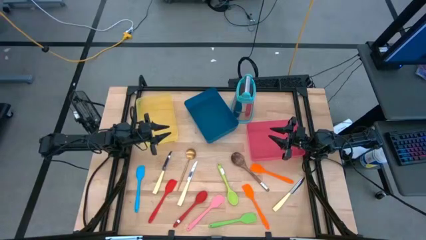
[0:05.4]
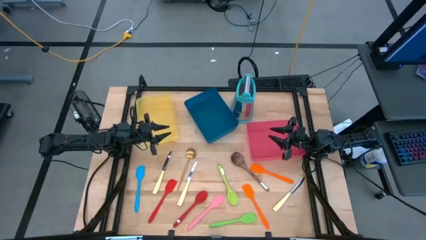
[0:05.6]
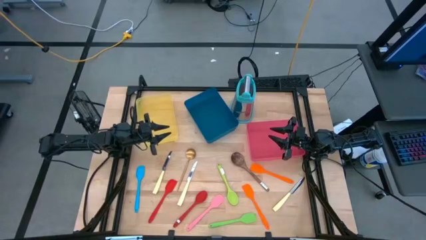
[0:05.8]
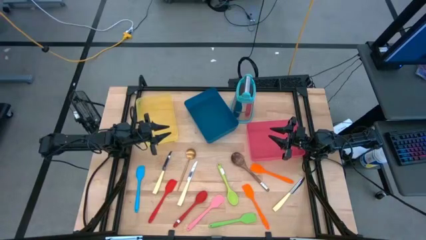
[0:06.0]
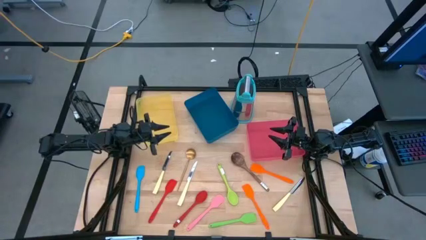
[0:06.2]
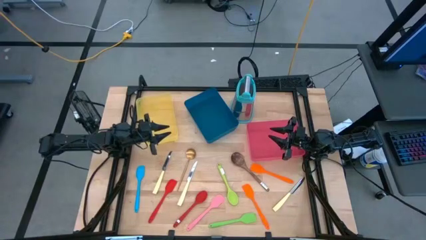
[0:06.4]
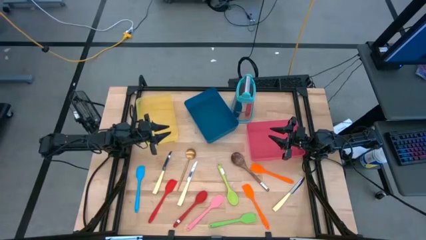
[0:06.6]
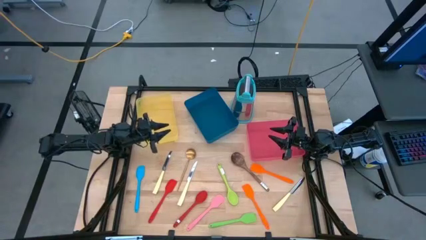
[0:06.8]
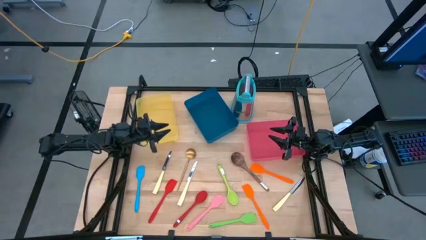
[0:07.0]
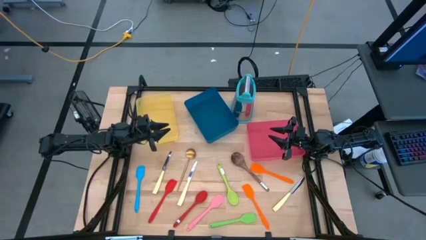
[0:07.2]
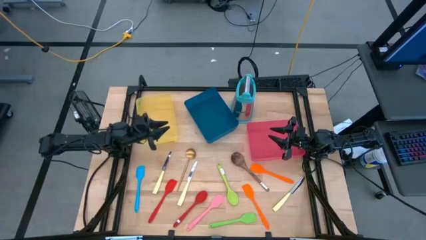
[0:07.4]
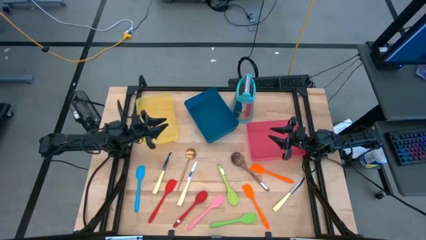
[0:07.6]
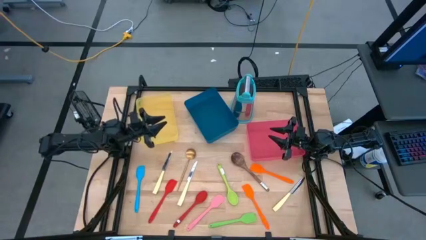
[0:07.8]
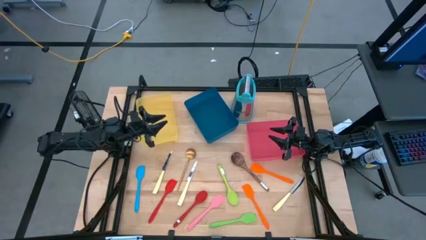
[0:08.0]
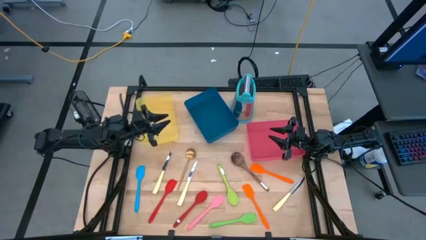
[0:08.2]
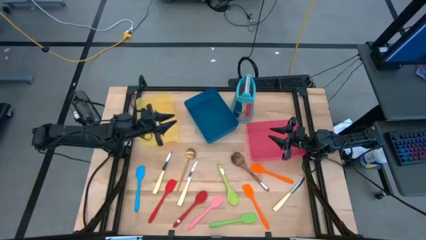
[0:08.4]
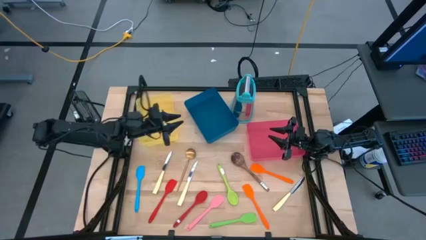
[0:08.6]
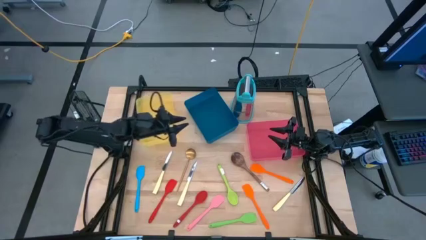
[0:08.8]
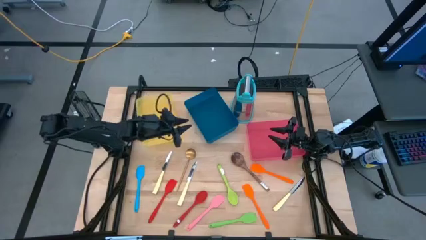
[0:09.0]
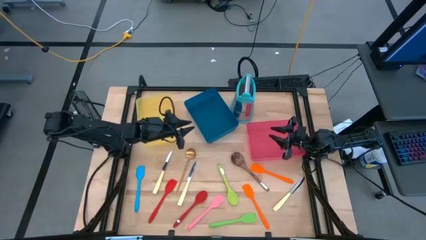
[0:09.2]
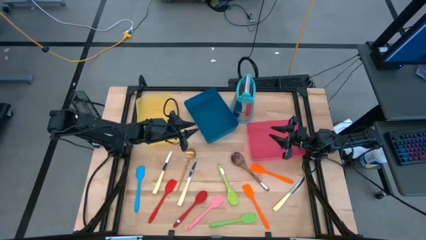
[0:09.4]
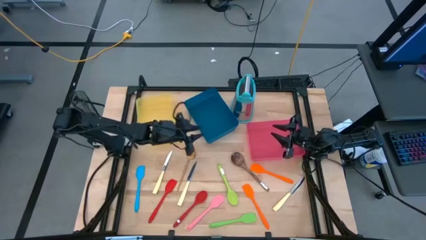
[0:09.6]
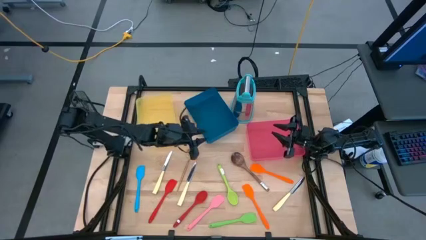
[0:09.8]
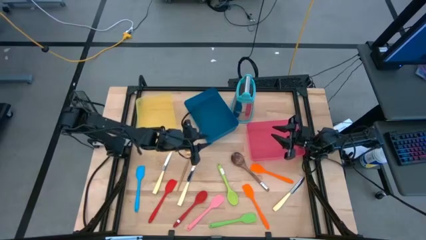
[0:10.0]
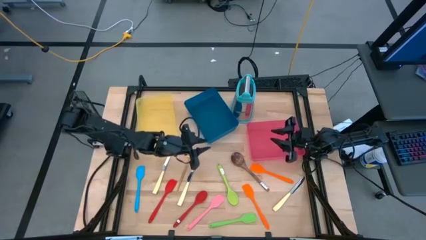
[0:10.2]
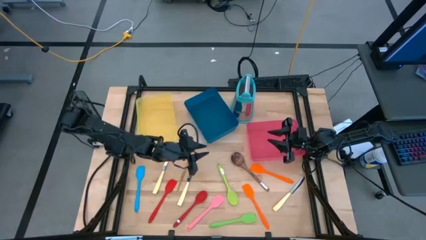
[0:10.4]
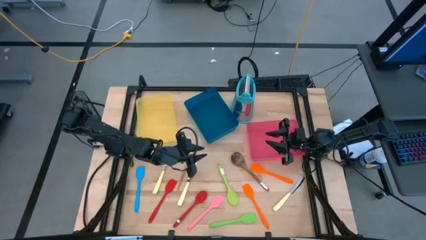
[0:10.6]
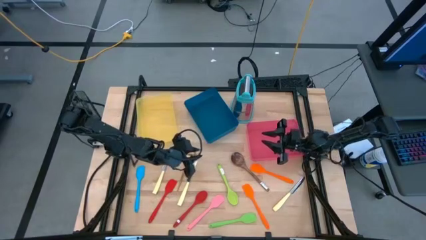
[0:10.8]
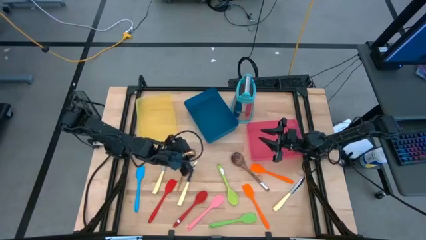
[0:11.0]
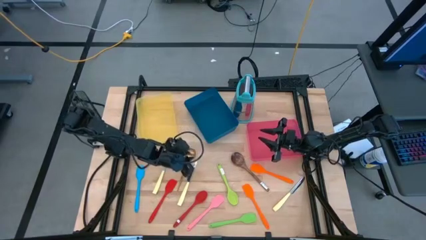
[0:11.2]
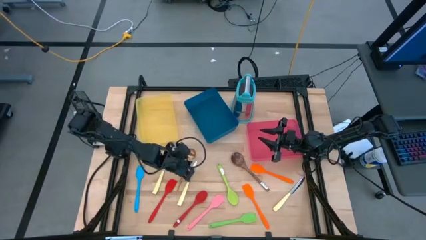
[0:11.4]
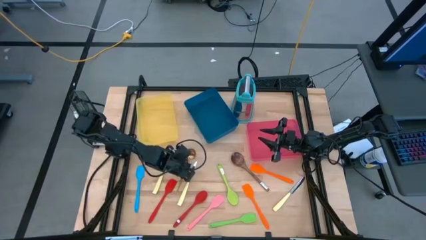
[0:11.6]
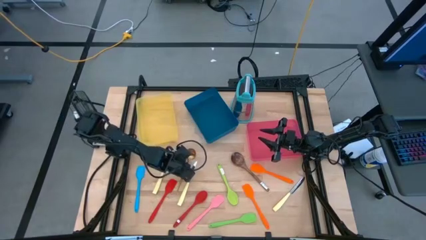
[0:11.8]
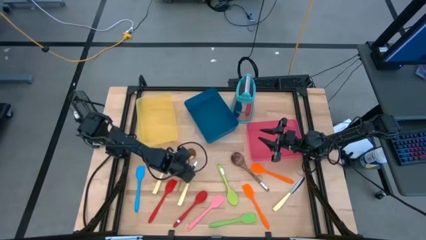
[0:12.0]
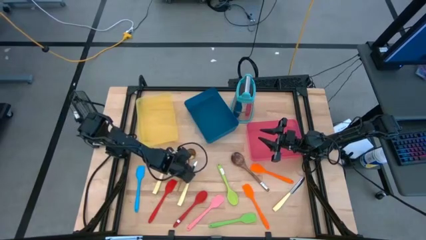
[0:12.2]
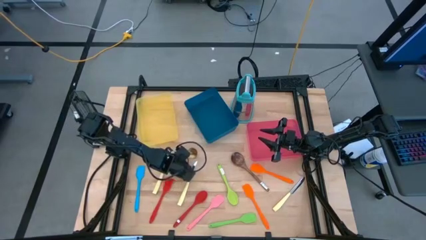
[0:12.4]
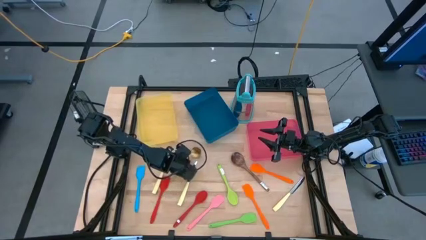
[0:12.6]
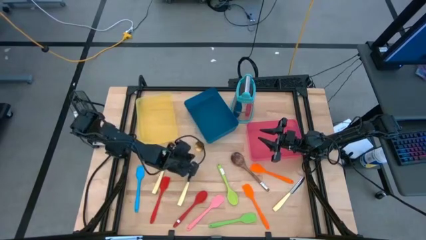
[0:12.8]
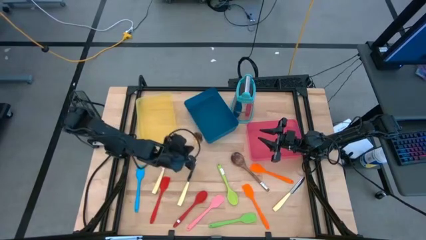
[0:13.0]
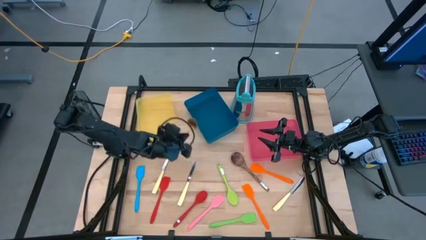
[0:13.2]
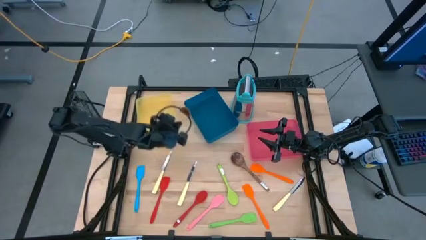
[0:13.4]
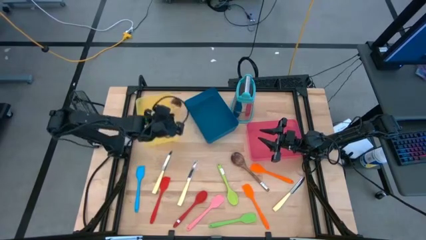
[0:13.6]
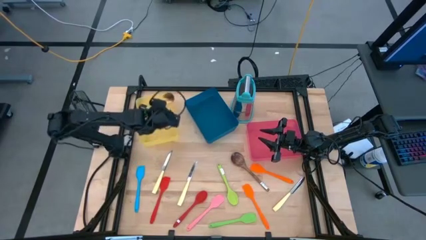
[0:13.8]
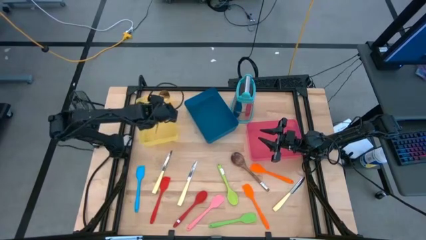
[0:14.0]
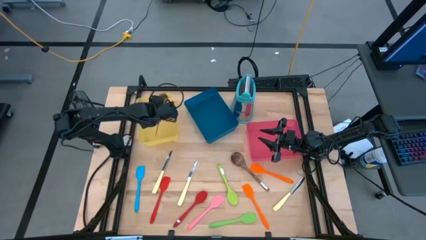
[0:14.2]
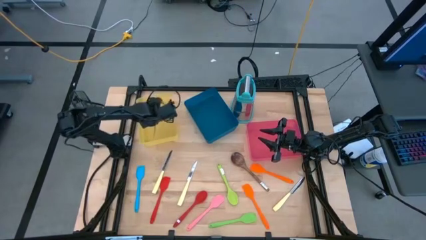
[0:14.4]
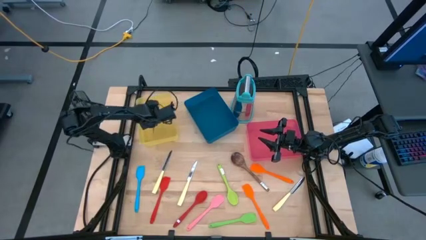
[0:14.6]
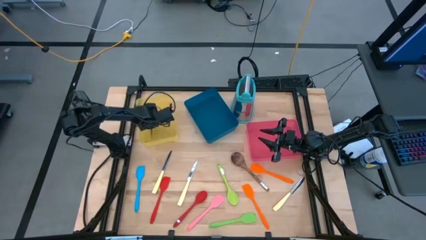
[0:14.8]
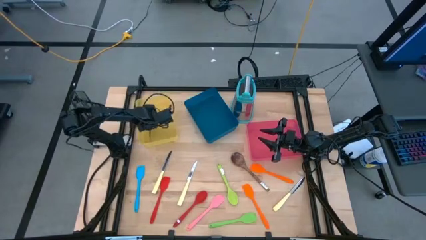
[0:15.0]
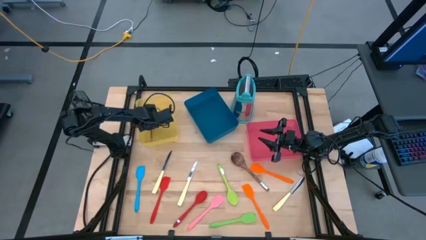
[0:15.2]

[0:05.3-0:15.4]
Task: Pick & Place Kitchen Items
Put the gold serving spoon into the yellow bin

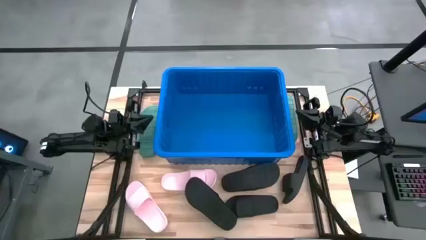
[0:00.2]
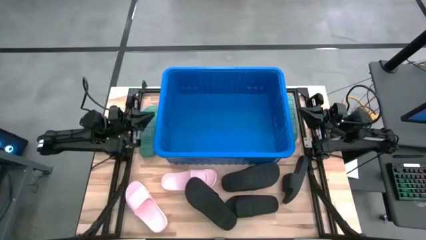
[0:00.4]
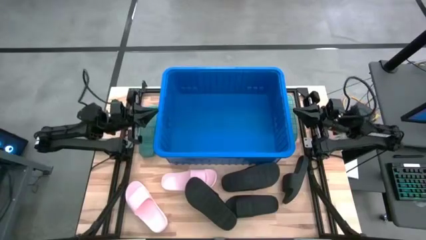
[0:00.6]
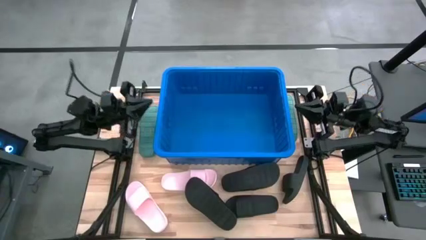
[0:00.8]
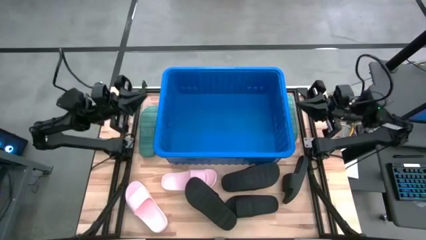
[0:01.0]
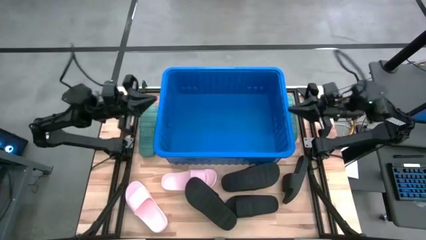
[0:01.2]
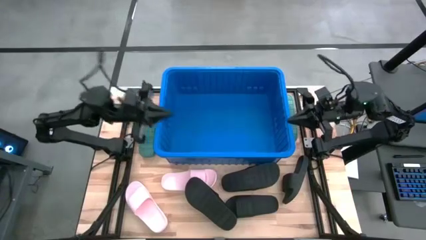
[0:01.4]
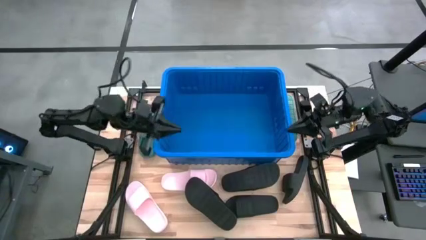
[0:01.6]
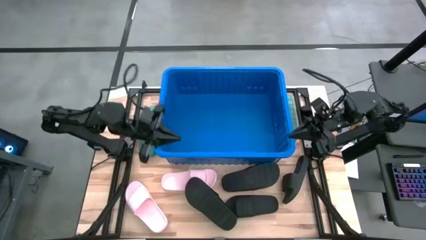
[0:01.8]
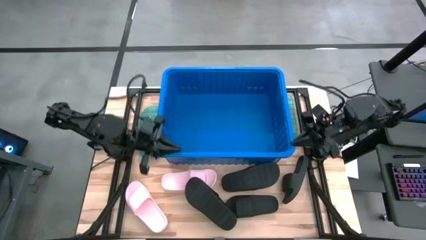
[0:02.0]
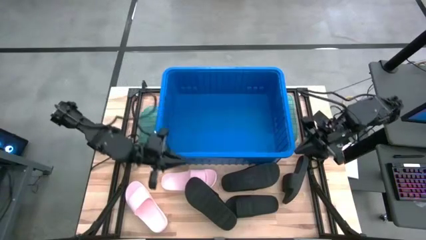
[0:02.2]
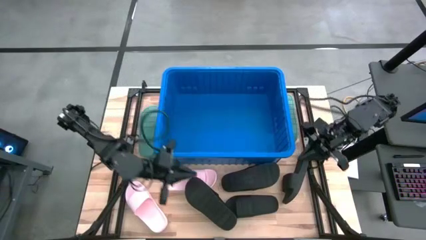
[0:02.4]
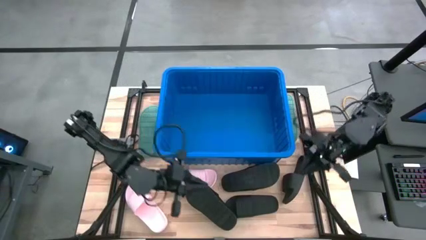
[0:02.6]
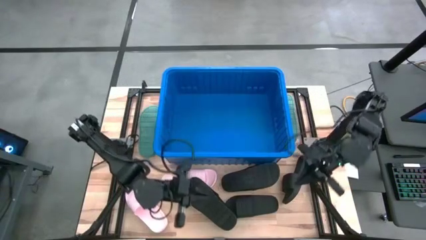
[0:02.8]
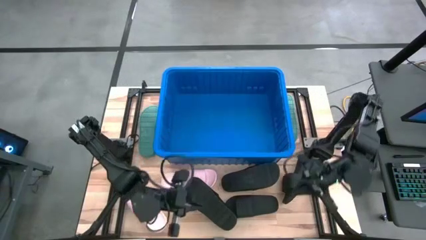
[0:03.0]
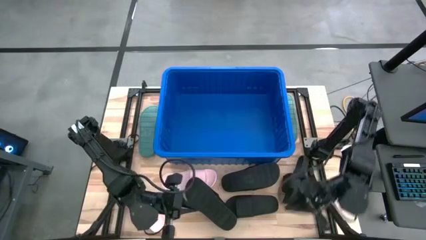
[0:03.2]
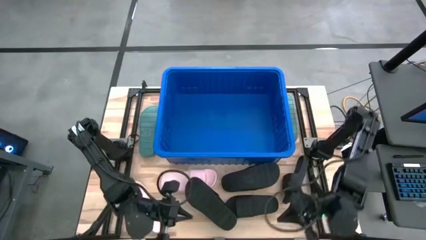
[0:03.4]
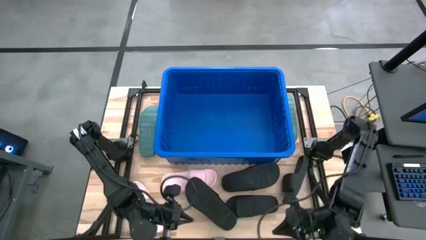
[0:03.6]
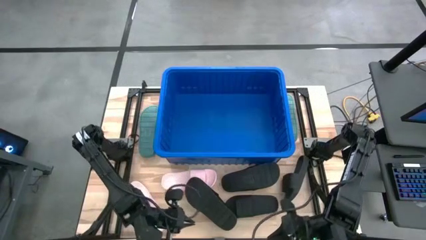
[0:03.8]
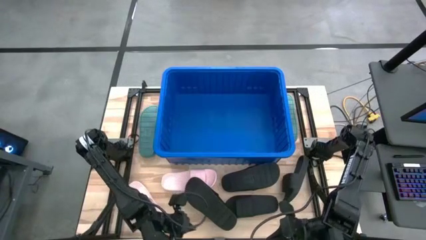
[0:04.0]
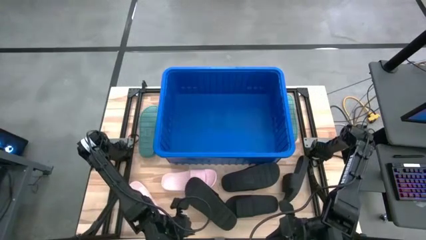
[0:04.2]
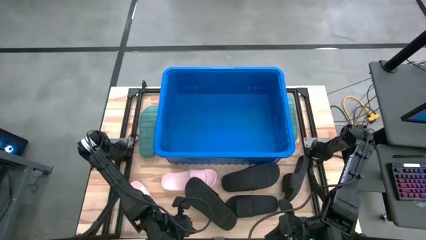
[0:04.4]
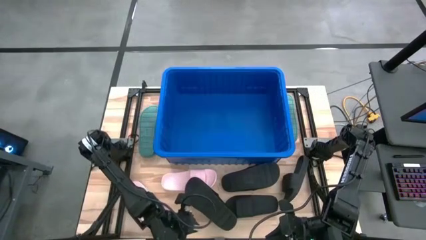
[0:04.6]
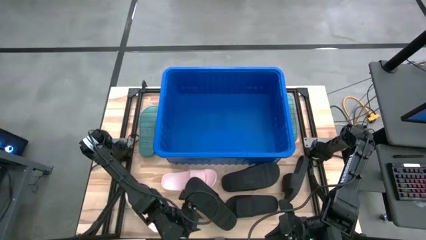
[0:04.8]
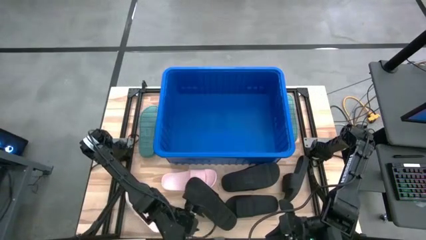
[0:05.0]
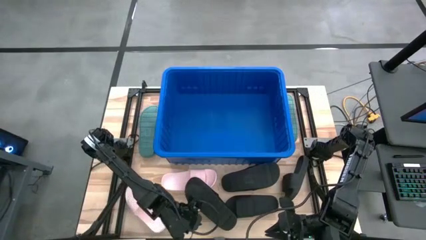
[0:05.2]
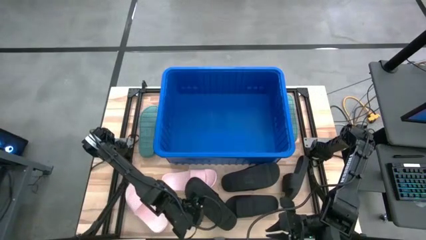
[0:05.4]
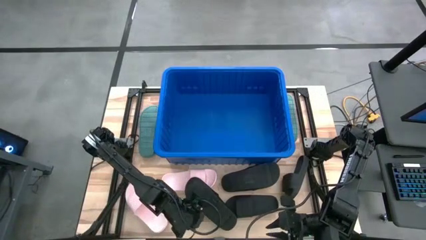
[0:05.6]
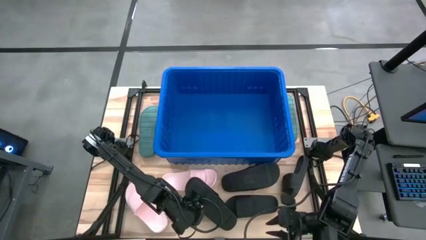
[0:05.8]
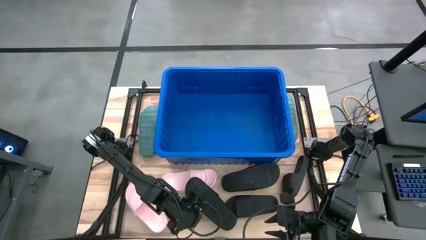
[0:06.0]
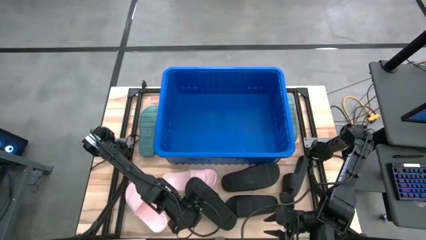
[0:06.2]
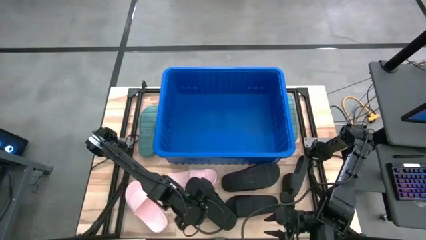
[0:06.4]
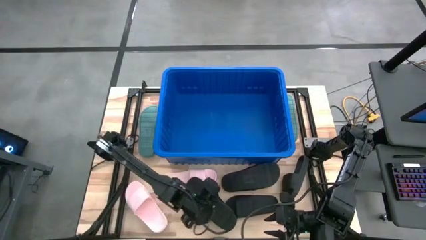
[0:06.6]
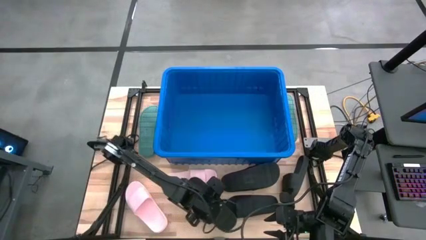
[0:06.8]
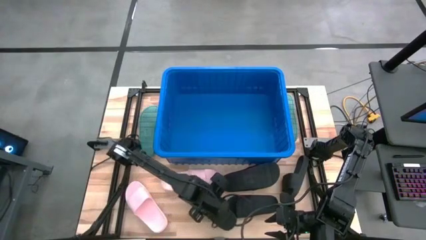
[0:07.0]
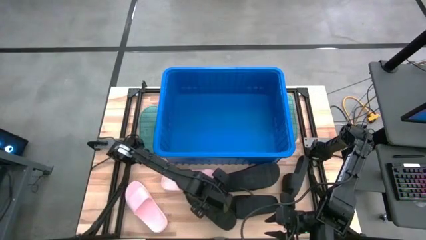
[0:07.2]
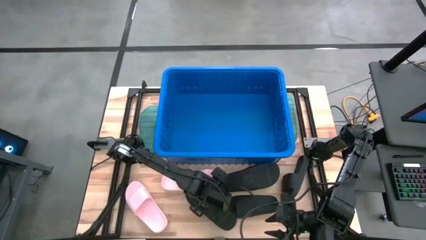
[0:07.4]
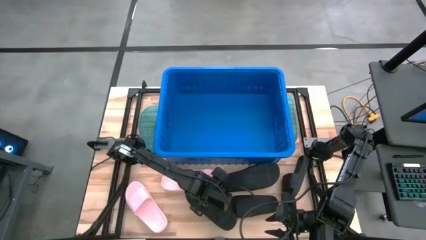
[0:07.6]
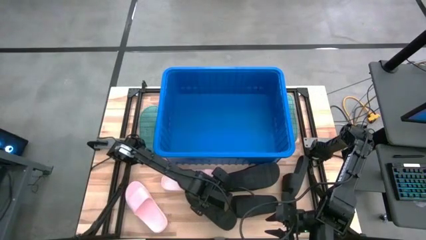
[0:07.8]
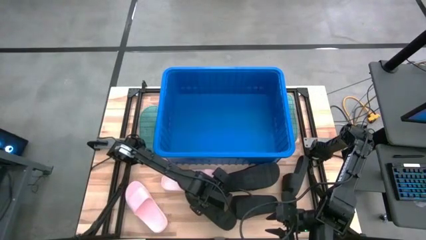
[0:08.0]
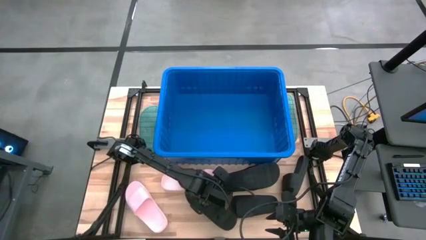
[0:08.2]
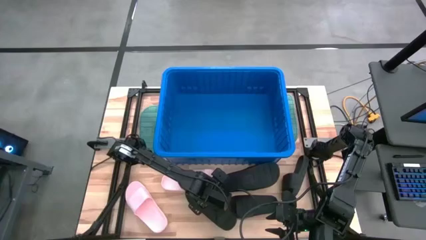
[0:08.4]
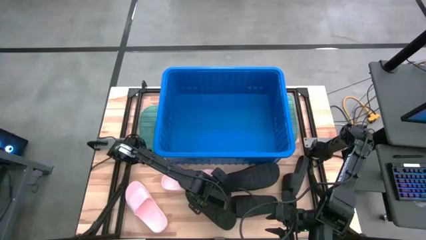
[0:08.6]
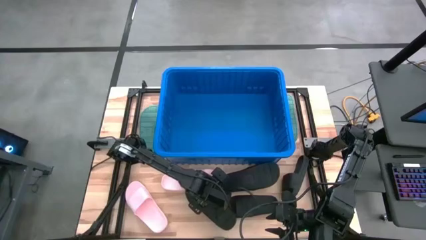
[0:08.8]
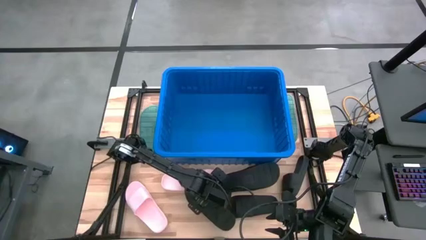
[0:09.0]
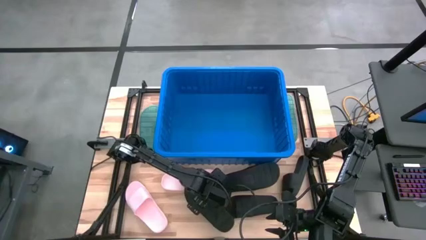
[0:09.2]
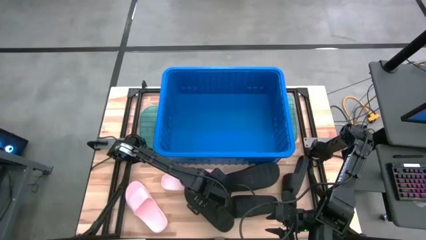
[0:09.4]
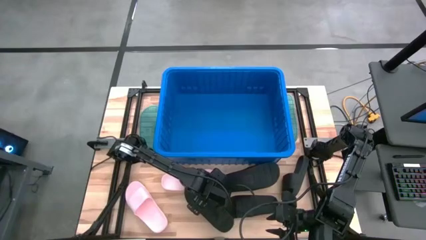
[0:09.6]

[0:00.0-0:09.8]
Task: Pick and place slides into bin
Put the black slipper into the blue bin
